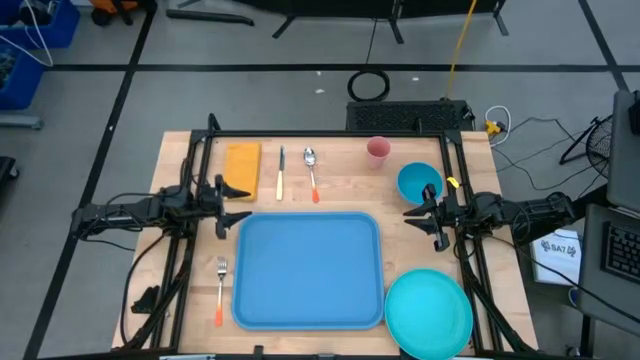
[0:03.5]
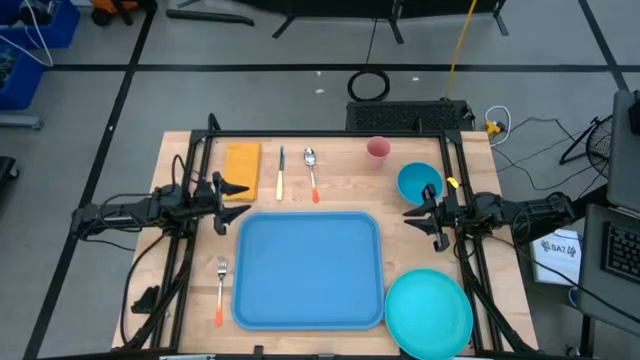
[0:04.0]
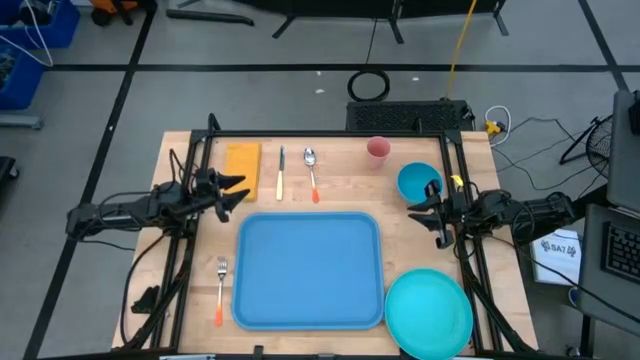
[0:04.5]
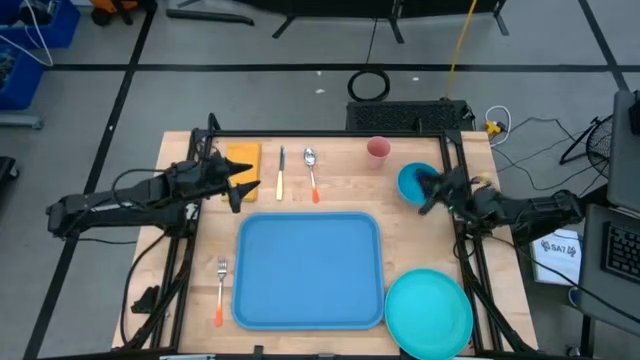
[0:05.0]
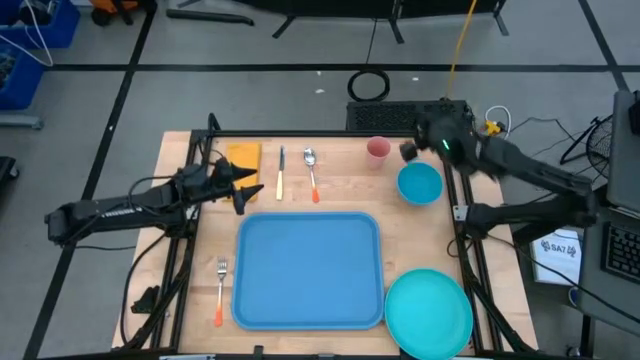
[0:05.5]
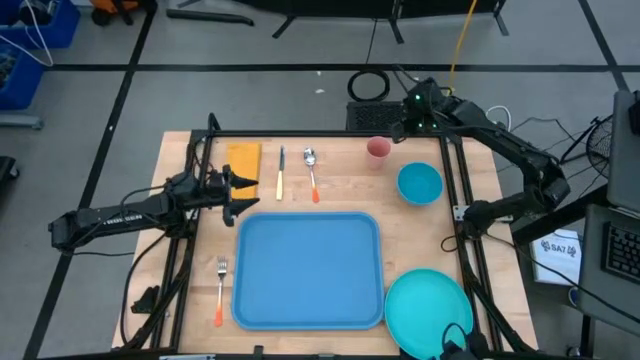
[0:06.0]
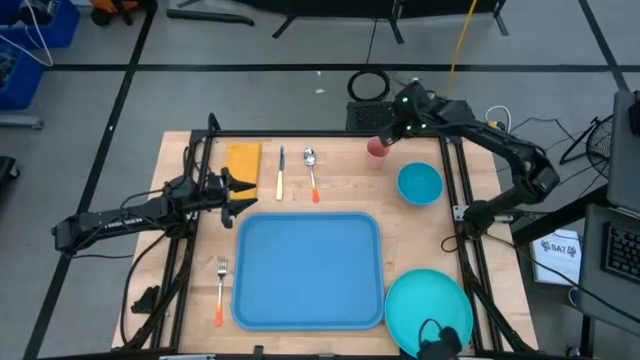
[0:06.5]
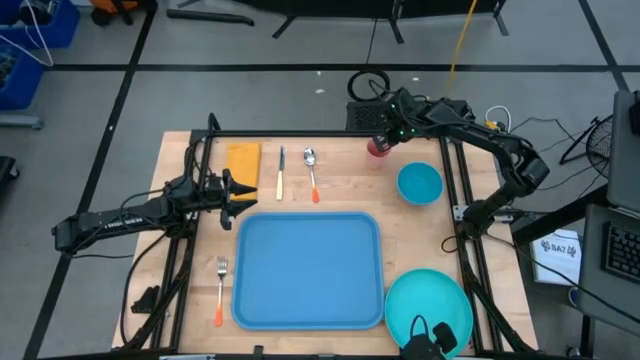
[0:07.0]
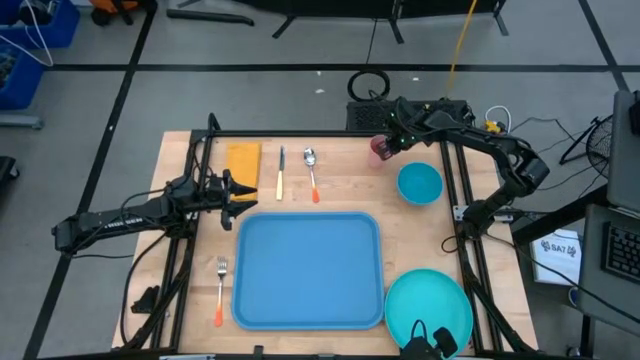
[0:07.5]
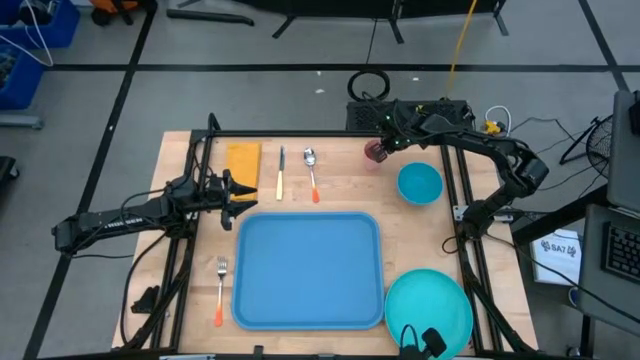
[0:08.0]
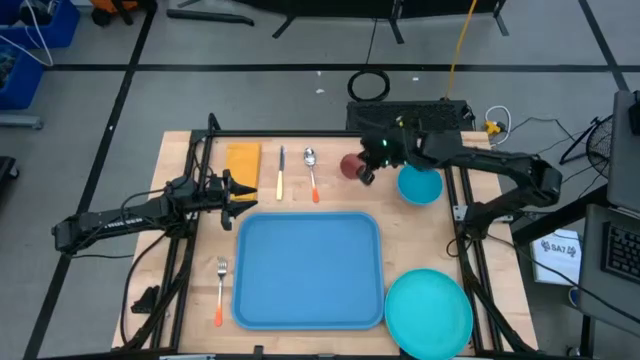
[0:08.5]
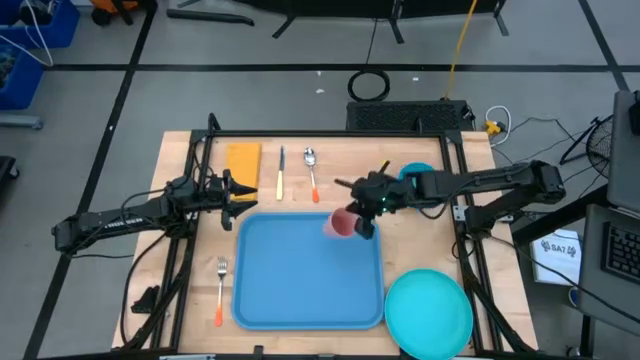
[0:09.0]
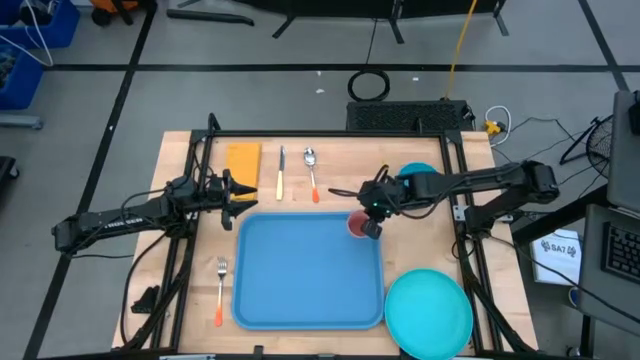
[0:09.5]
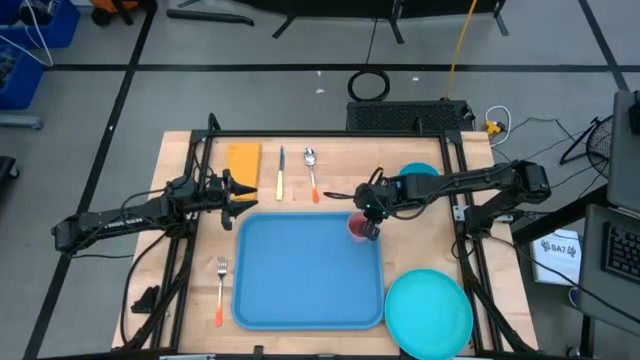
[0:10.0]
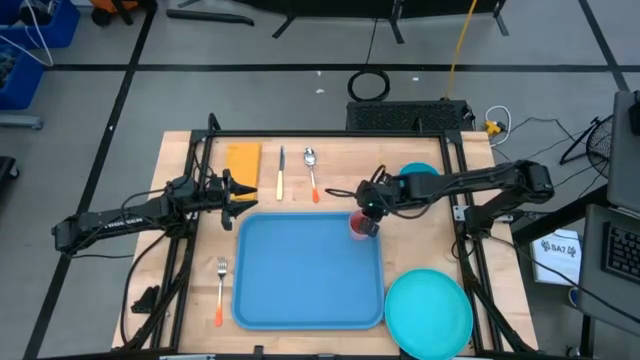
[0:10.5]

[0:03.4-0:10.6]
Task: Set up tray
Put the pink cup on the top right of the blue serving tray

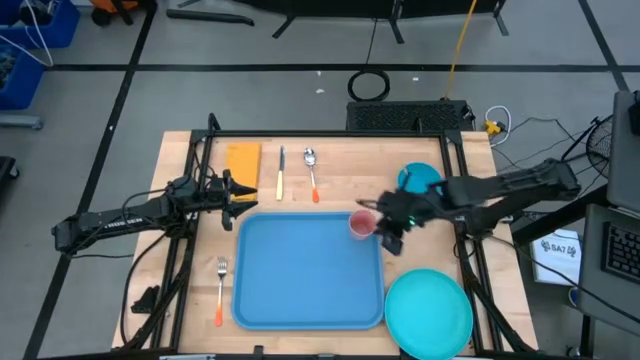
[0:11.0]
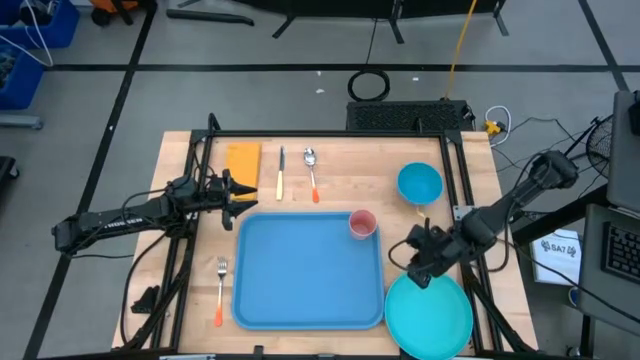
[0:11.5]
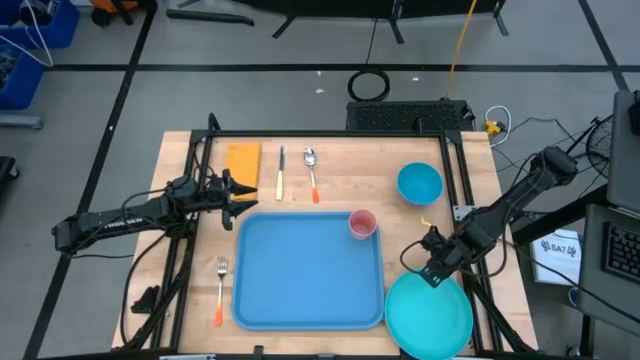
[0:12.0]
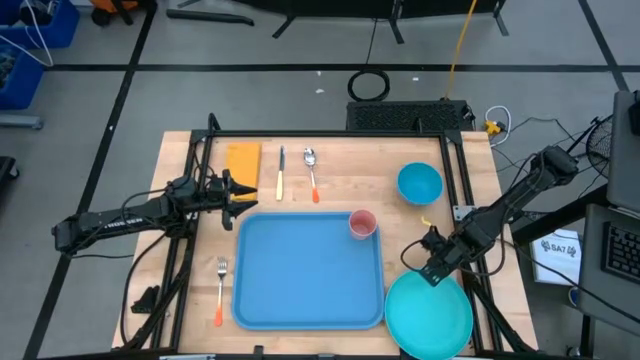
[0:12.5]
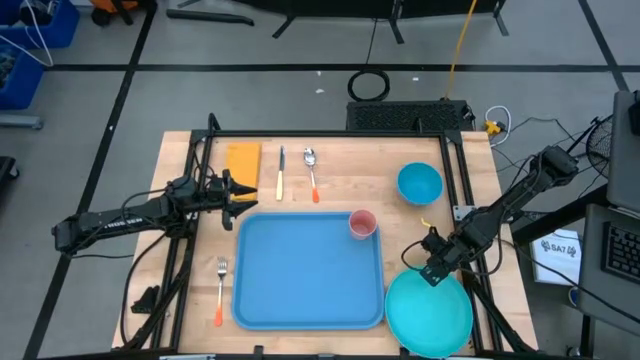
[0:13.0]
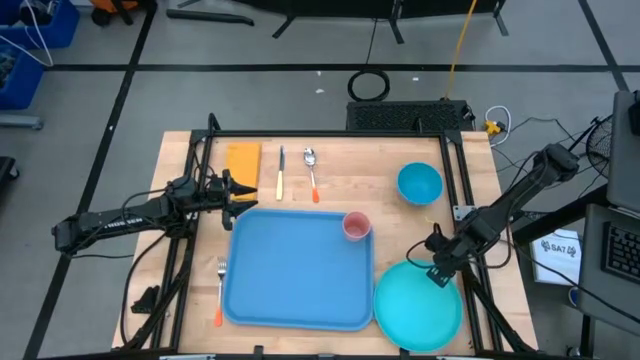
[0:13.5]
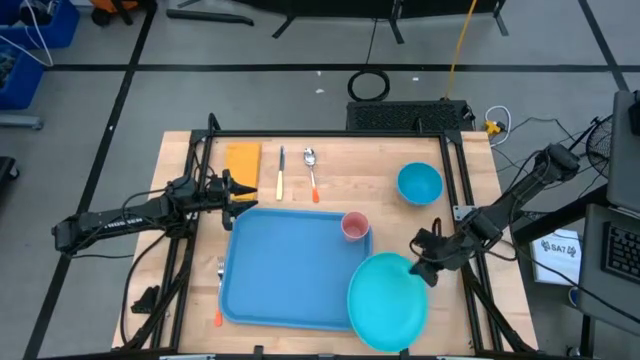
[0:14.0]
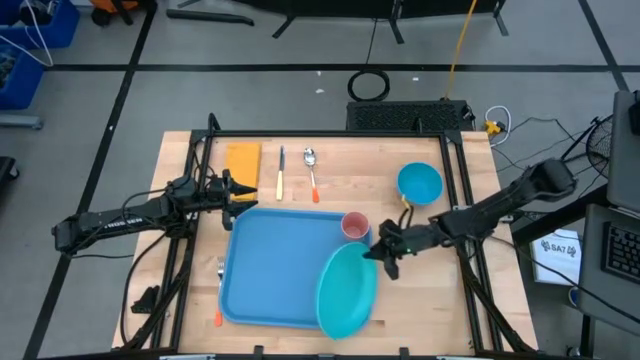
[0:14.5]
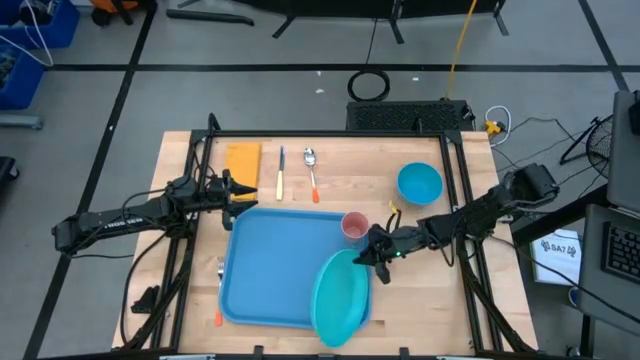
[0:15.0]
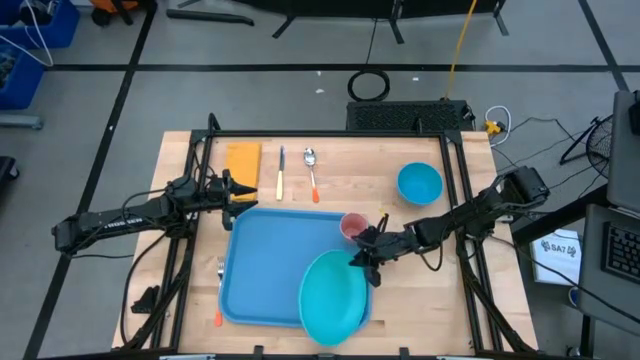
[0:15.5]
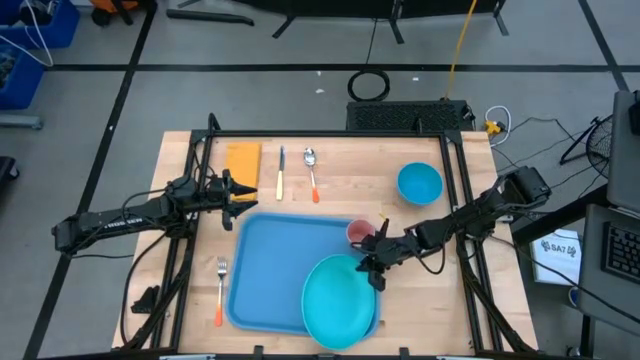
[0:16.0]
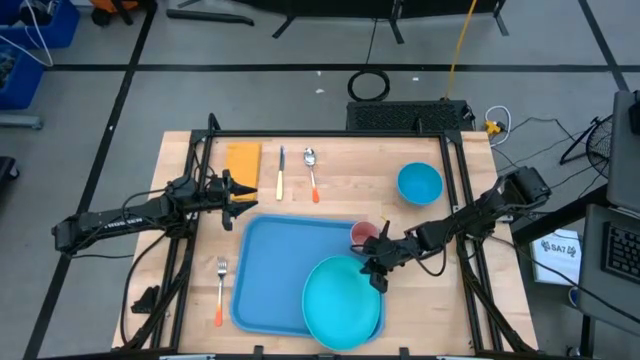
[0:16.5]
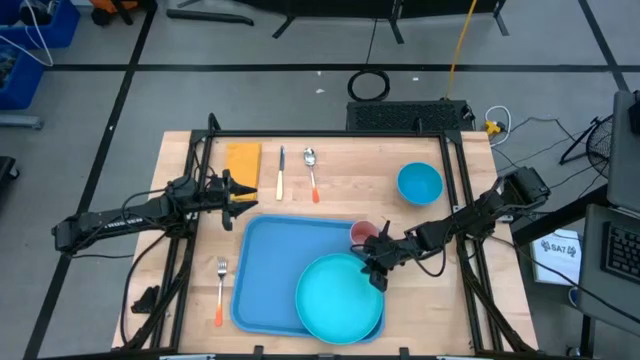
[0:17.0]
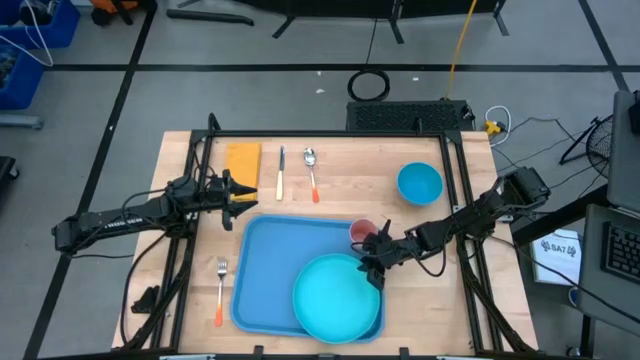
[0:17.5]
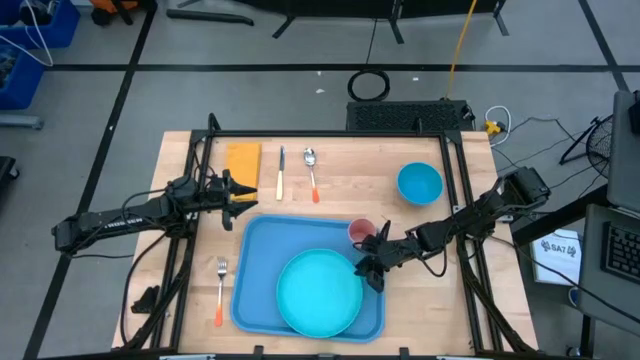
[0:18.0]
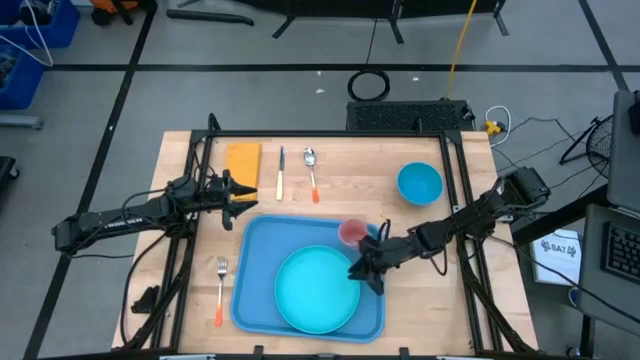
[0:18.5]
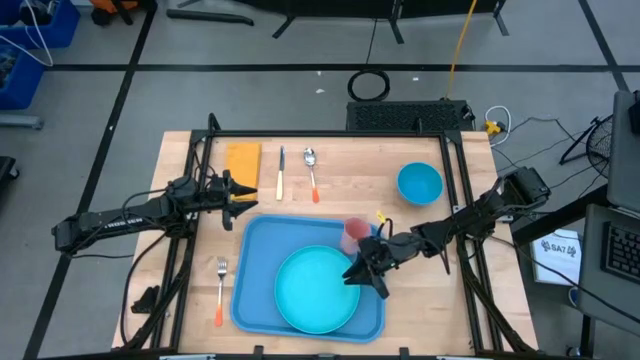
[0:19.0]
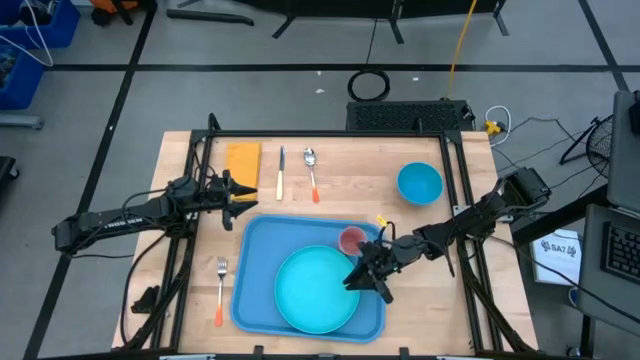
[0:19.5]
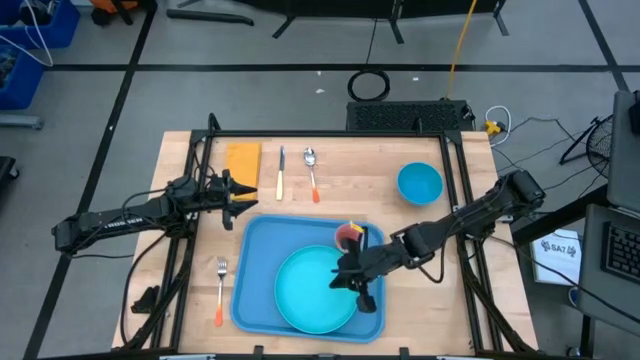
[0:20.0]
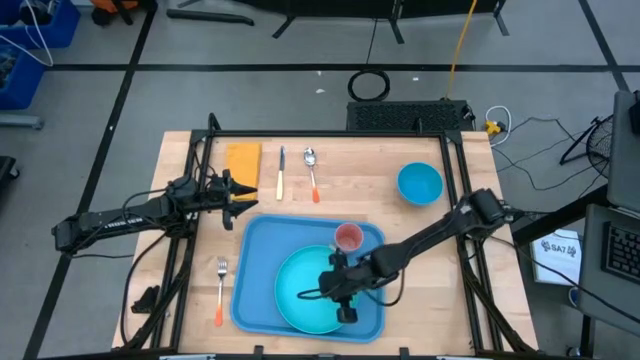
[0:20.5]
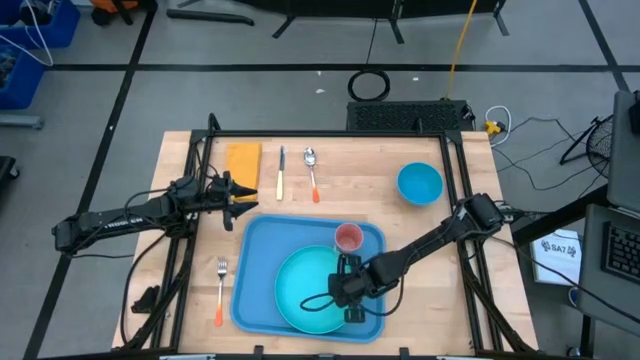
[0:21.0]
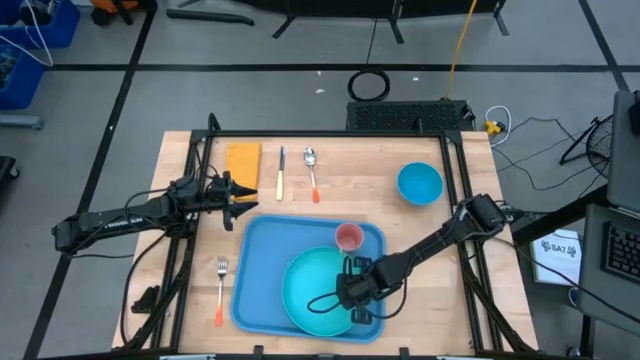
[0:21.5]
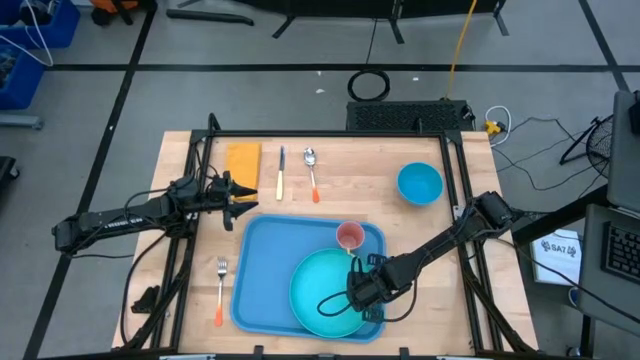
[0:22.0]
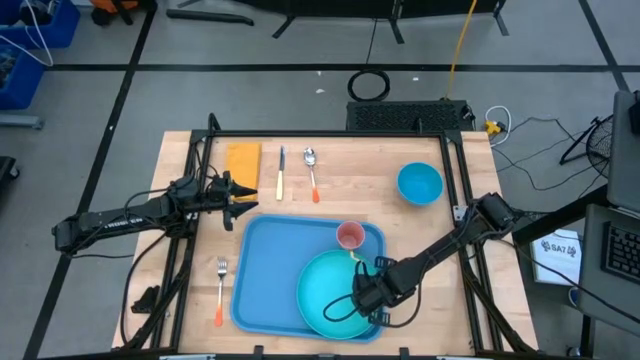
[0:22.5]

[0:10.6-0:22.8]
Put the light blue plate on the blue serving tray below the pink cup
